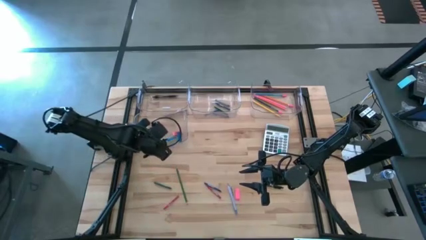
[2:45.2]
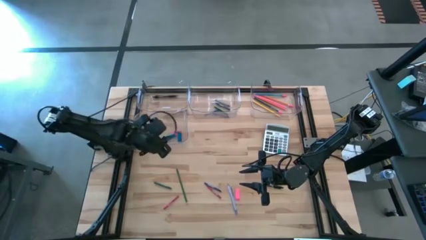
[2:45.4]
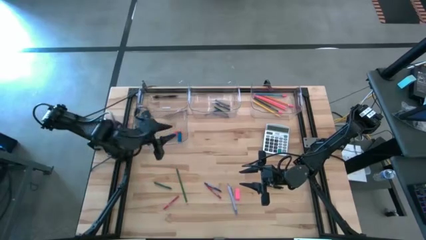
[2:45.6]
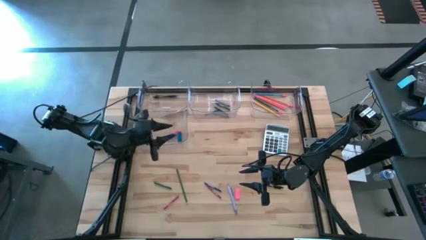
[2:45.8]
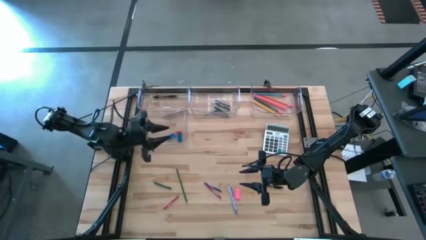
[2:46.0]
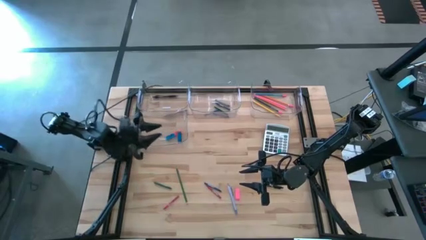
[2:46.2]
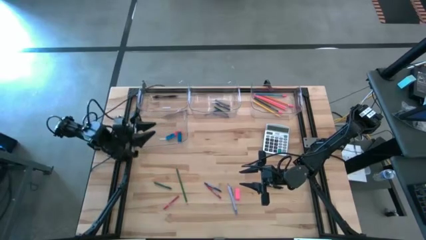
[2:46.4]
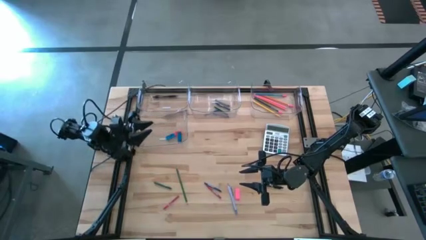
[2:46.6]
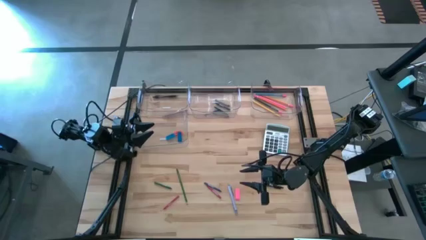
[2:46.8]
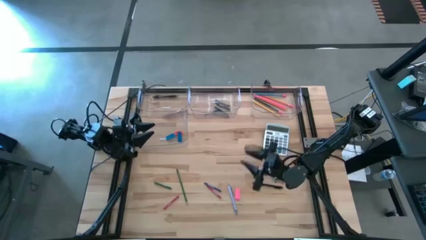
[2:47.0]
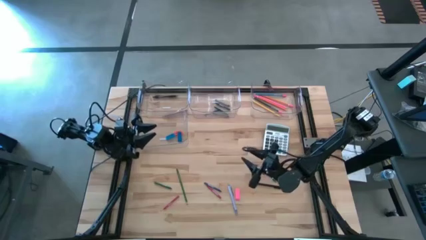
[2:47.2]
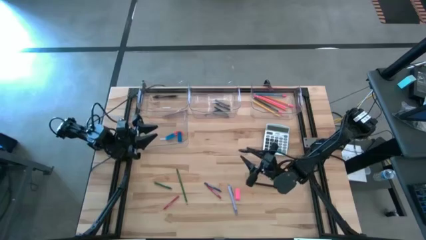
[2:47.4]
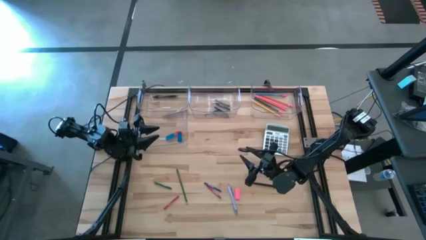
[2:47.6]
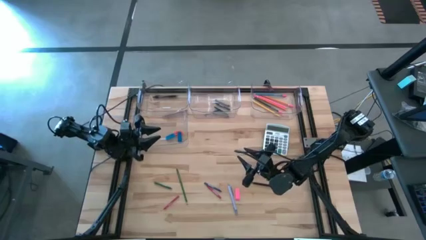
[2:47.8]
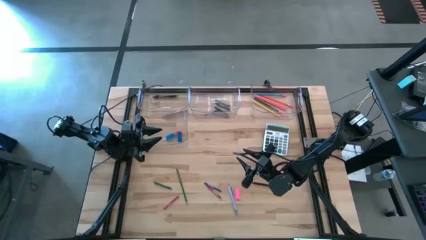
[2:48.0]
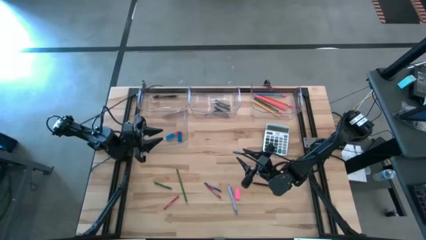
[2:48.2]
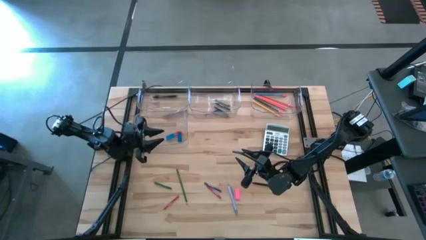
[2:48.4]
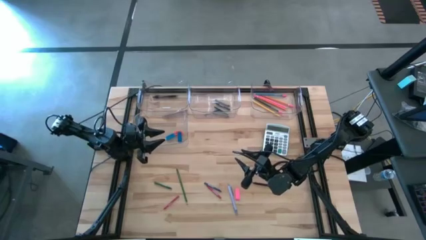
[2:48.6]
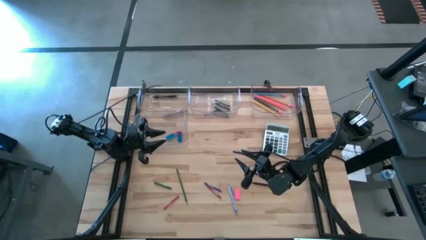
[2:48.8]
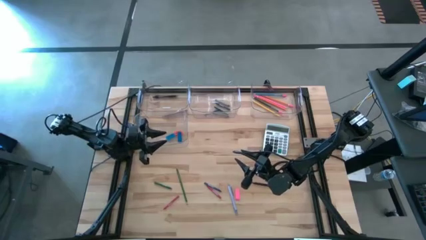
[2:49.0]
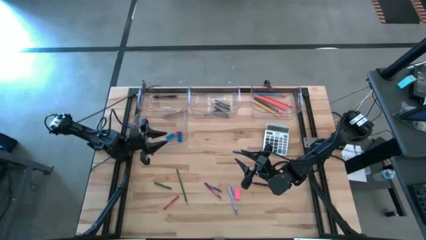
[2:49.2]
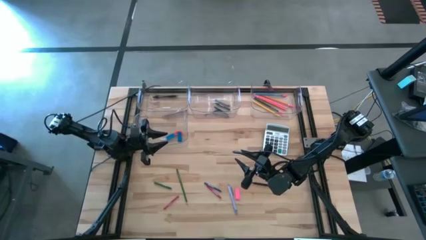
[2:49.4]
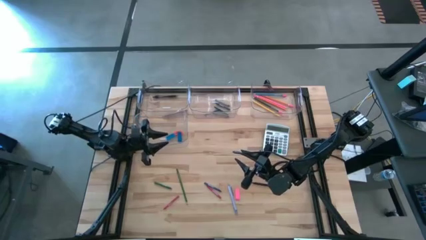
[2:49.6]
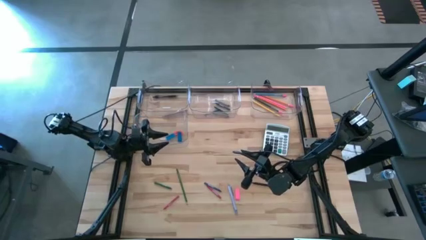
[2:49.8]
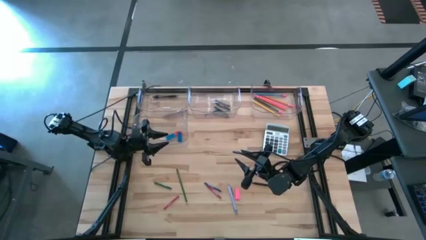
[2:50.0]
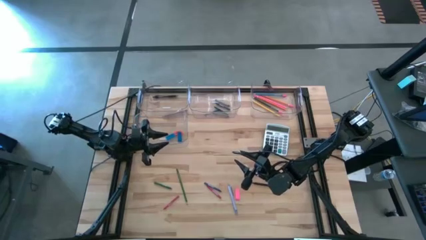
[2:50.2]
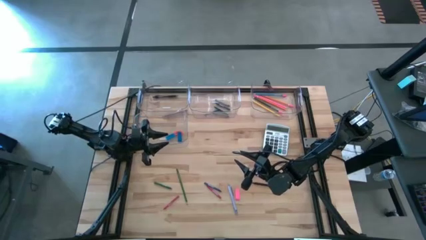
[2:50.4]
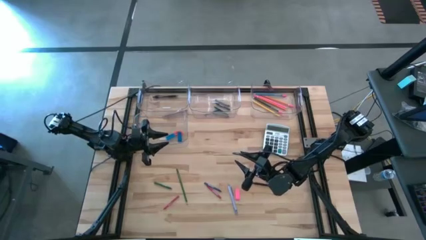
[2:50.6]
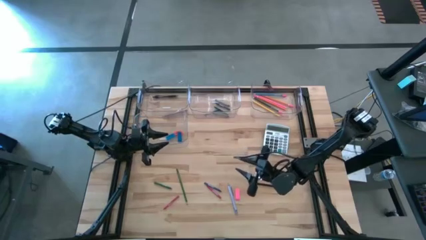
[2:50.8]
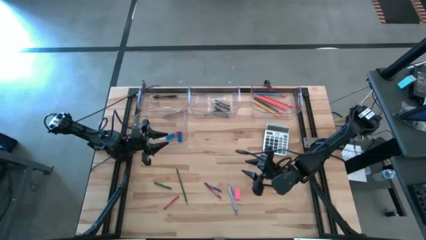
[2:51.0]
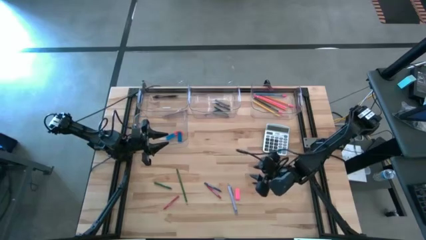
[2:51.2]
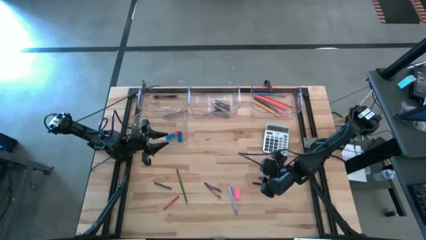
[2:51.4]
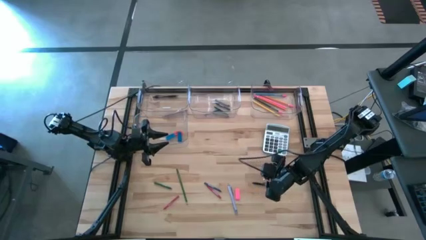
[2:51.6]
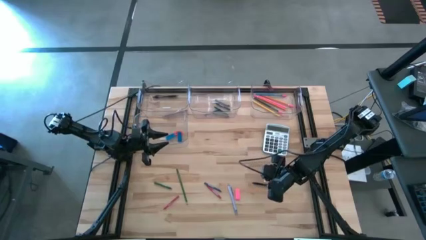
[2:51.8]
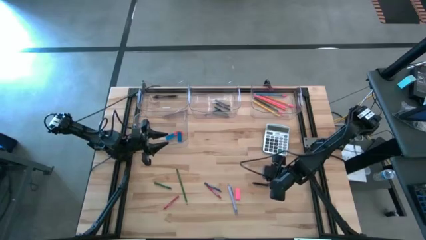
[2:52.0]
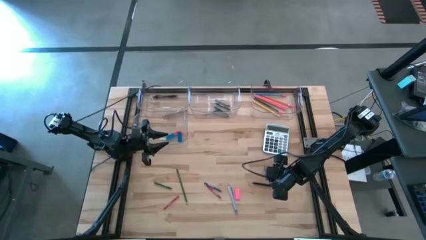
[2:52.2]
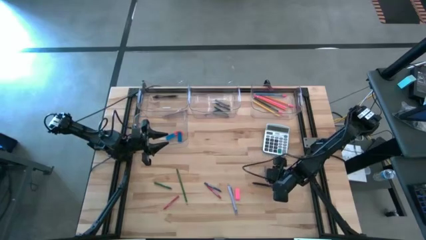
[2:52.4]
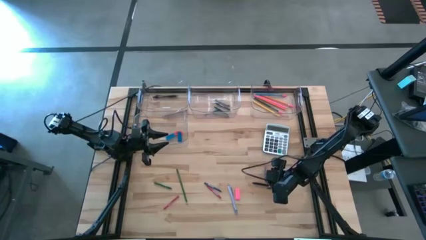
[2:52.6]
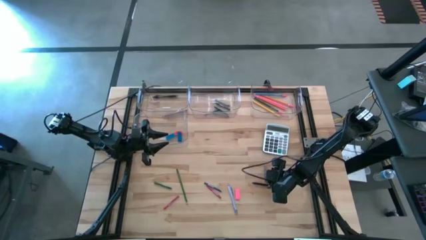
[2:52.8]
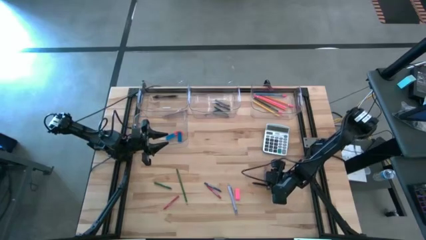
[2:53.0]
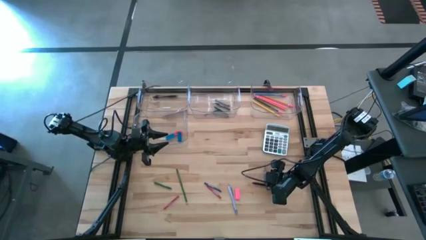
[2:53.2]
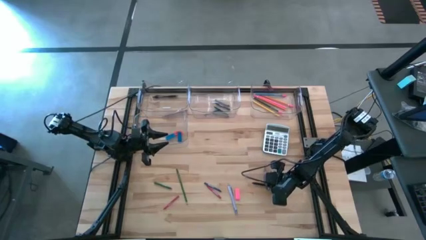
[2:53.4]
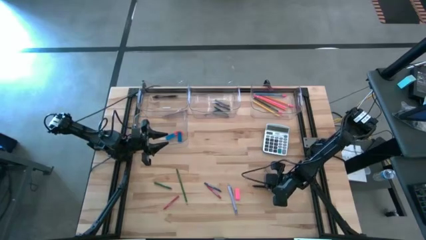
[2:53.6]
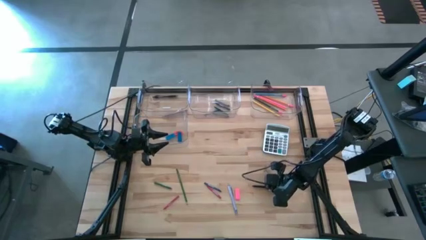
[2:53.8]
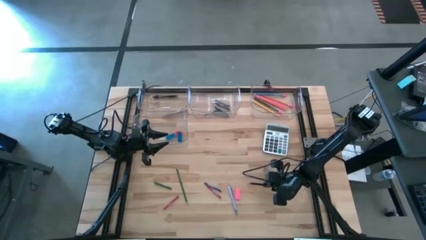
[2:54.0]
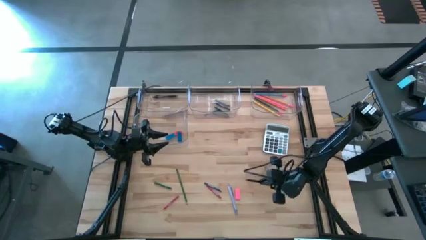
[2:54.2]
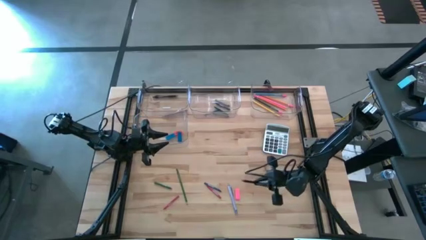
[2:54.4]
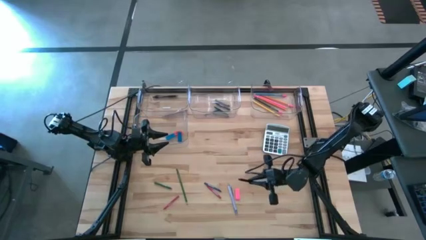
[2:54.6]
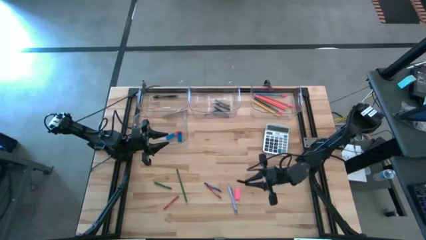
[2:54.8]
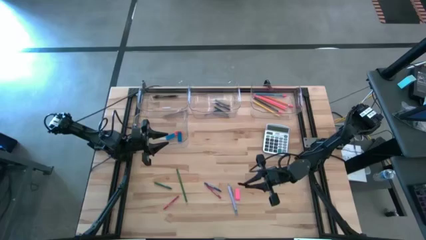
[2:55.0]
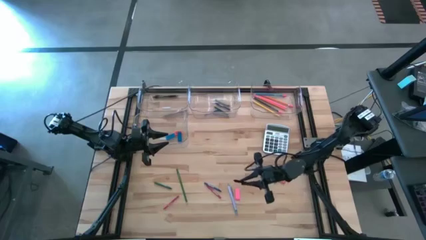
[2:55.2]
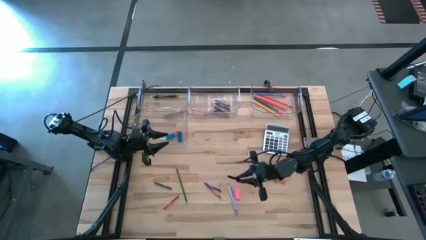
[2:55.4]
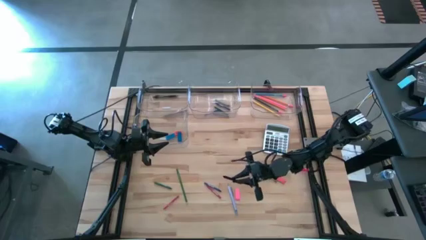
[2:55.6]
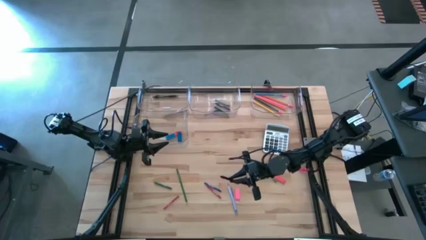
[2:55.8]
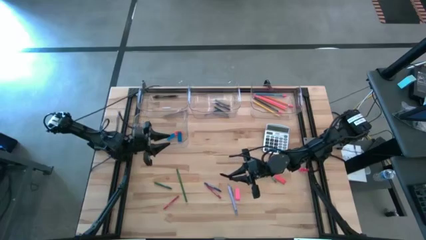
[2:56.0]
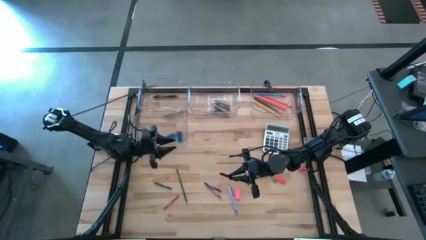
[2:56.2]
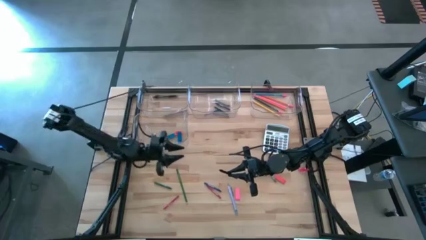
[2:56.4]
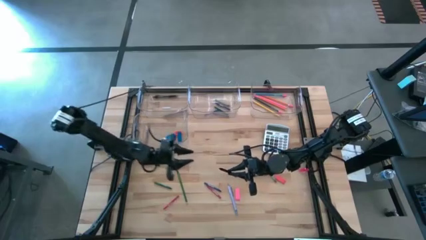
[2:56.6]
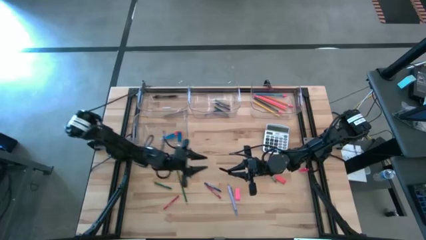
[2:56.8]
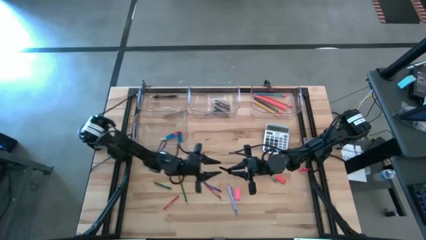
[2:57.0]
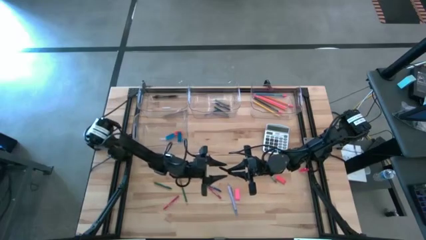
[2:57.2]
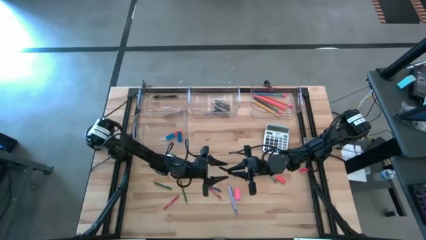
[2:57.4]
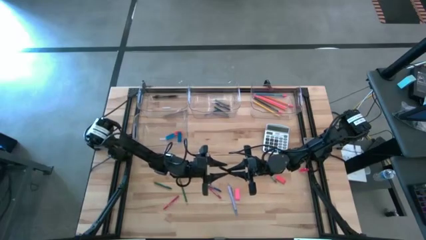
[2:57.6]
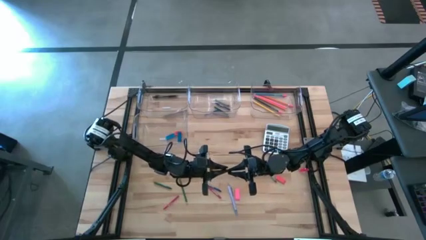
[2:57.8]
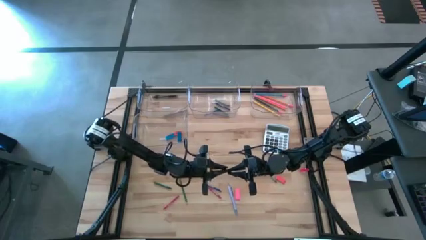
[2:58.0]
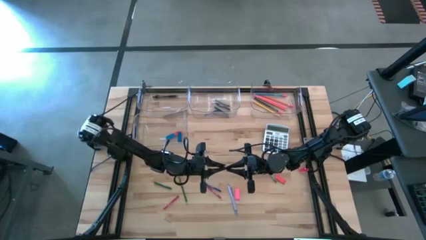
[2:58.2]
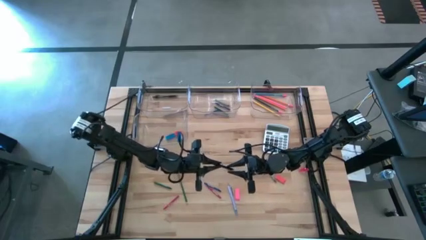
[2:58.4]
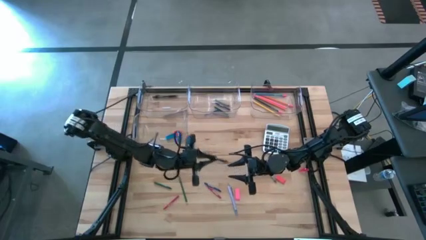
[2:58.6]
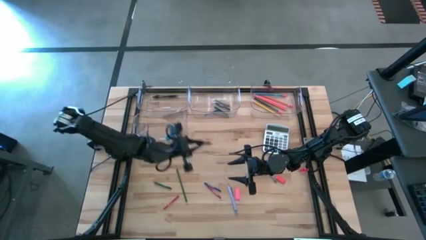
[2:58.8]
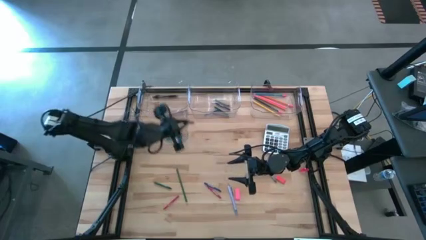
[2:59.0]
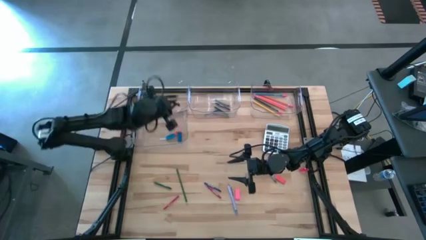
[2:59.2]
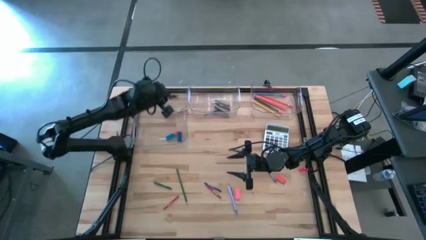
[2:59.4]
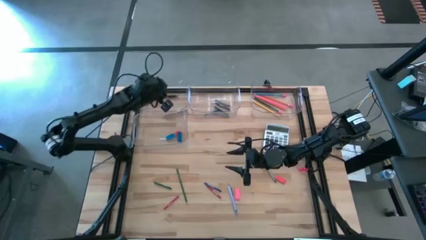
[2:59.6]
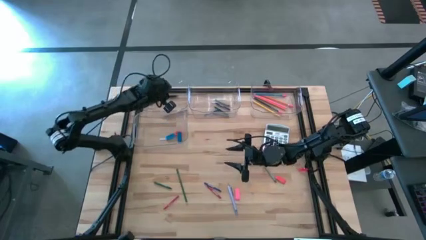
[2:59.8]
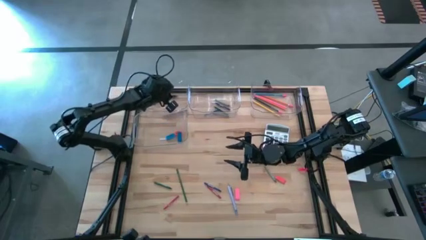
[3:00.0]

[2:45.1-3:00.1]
Task: Sort crayons/erasers/pens/pencils in bins
Put the black pen into the top left transparent bin

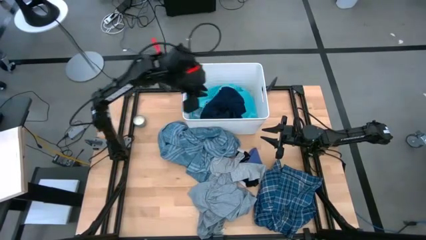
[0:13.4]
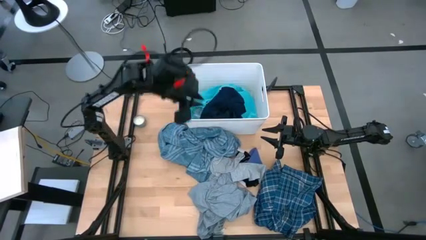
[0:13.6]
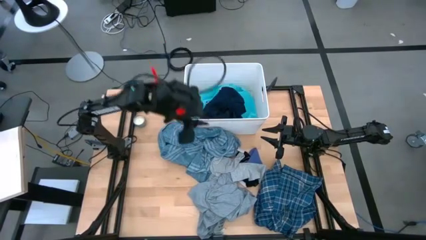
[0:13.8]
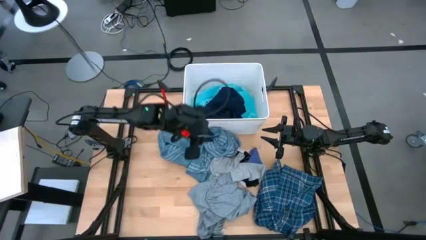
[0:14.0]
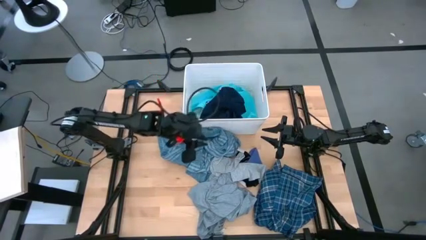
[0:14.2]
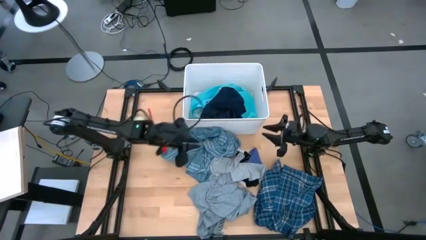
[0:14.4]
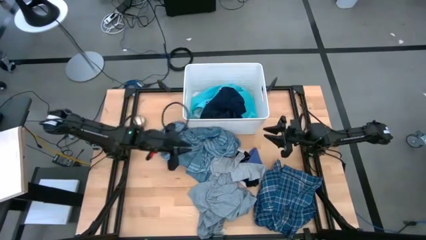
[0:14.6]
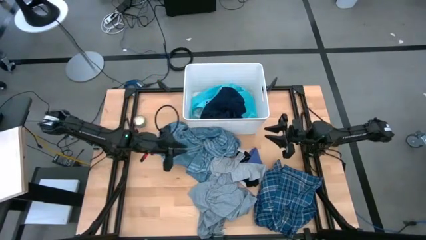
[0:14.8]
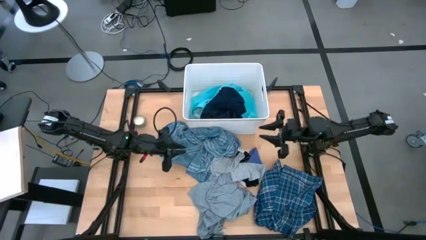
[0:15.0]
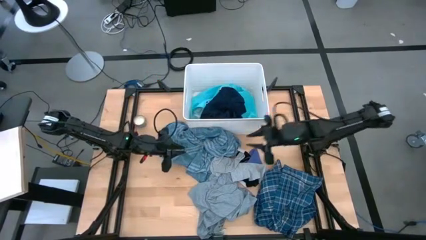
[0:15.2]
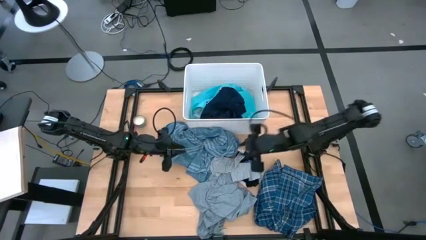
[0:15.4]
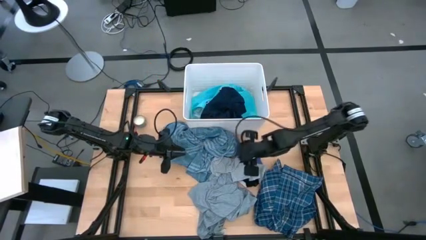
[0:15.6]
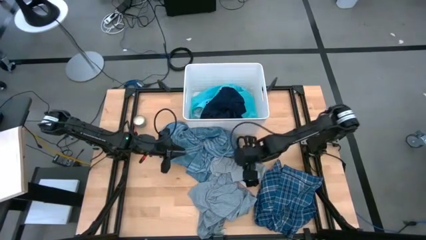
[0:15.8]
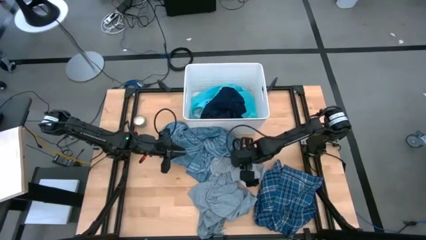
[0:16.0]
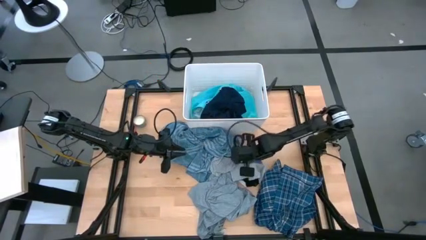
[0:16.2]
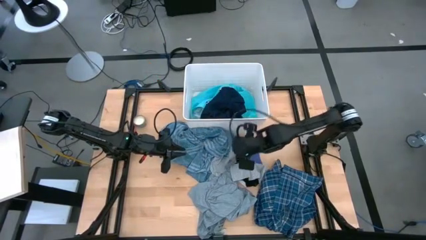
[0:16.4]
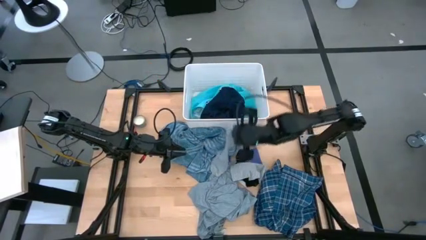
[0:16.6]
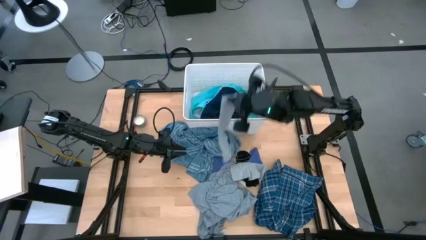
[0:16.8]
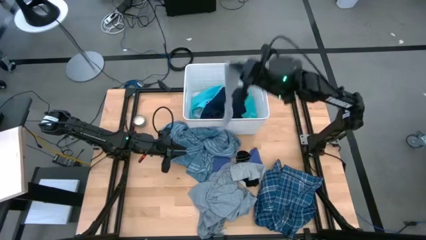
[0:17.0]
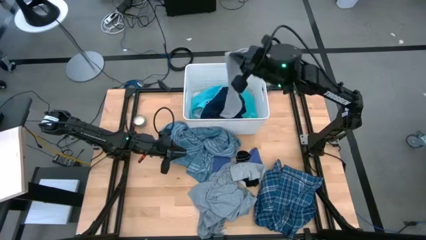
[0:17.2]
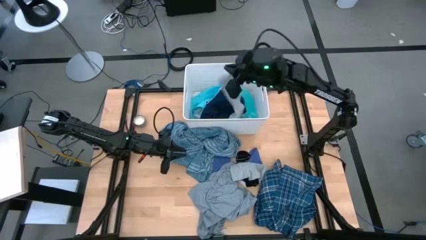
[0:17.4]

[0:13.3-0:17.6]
Task: Sort clothes
Put the gray sock into the white laundry organizer
